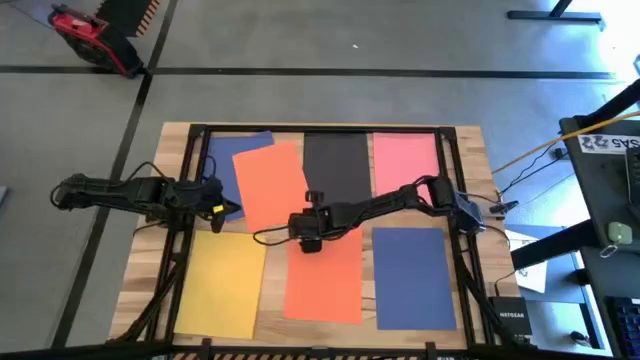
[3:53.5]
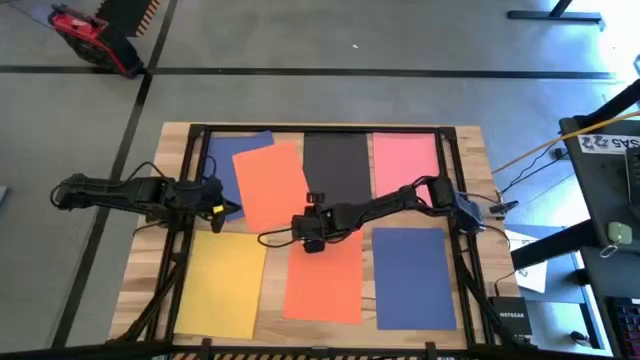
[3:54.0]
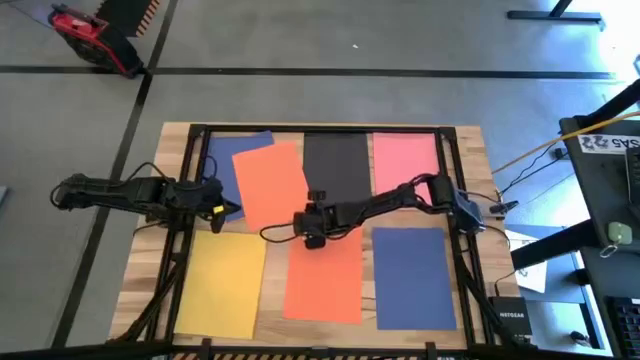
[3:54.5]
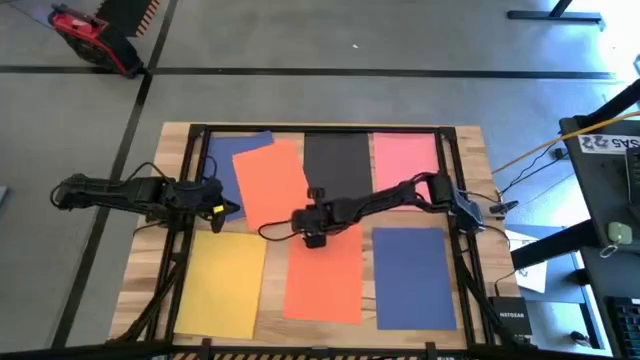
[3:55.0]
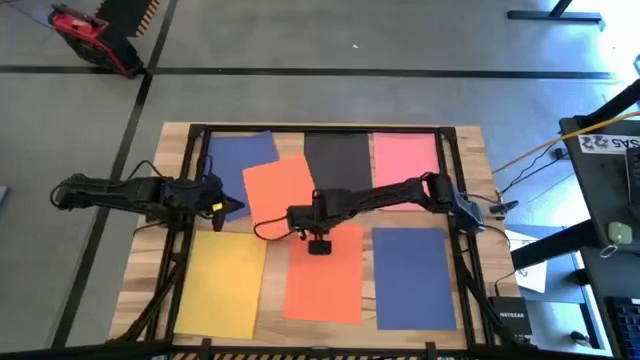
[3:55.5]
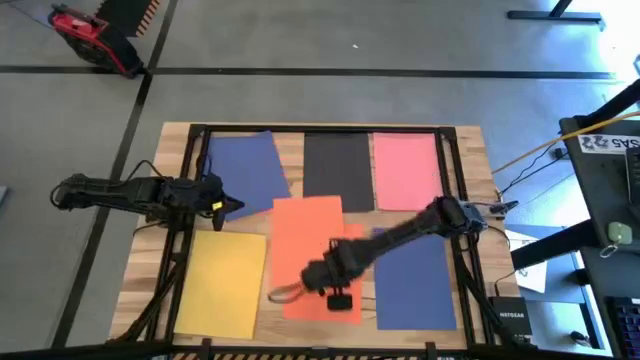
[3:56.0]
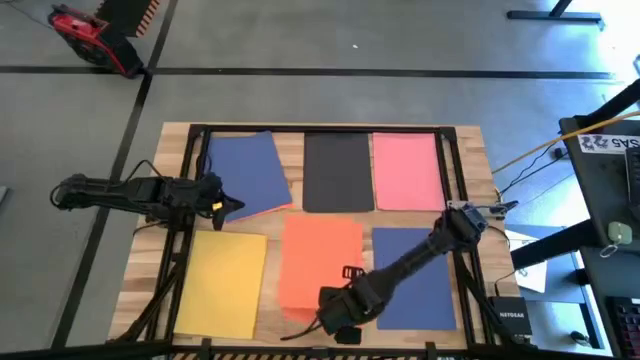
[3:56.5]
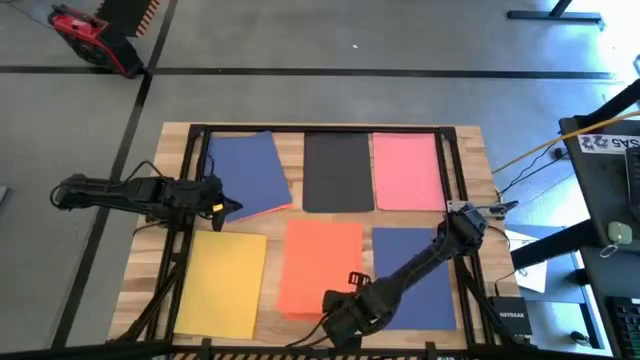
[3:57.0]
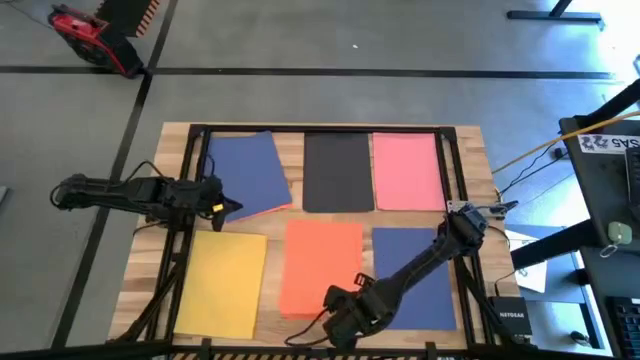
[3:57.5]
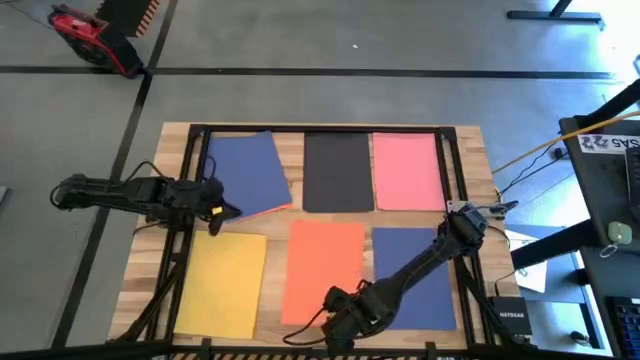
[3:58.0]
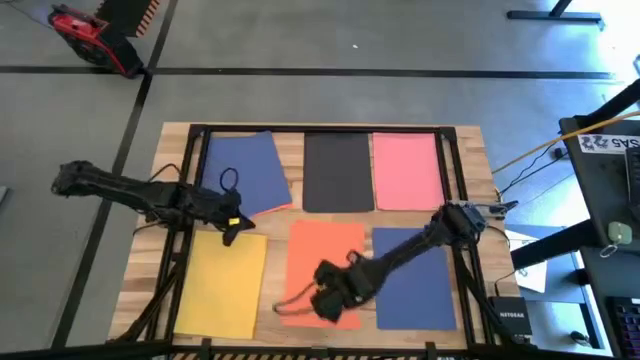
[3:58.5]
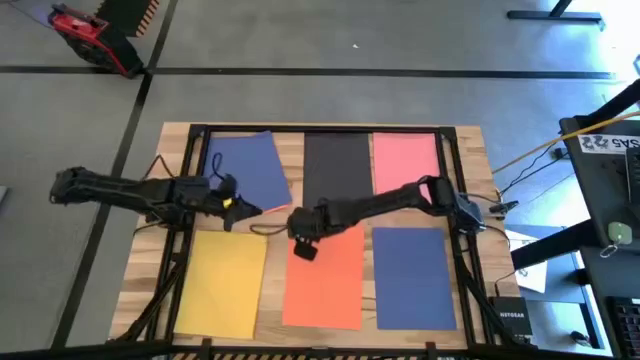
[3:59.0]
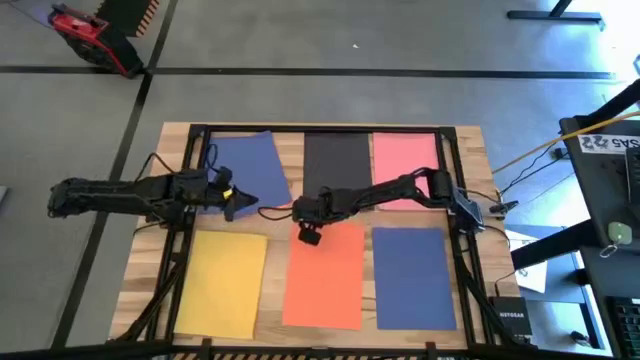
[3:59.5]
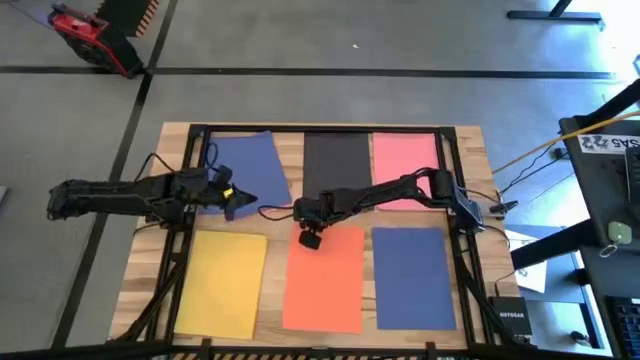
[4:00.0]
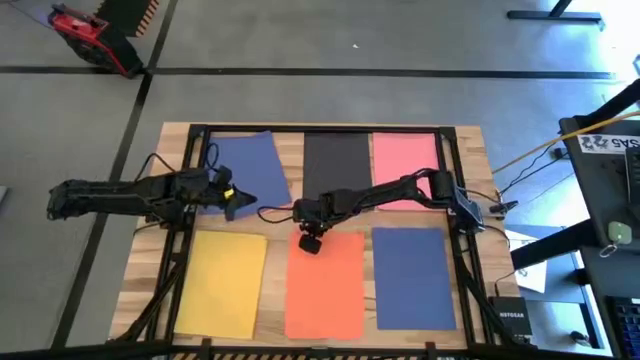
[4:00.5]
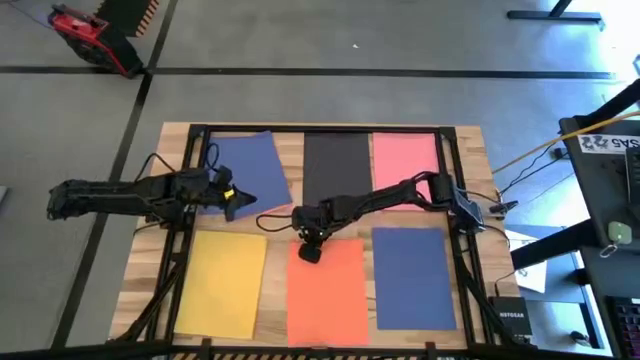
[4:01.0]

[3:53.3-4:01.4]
Task: Organize paper
Stack the orange paper on top of the other orange paper

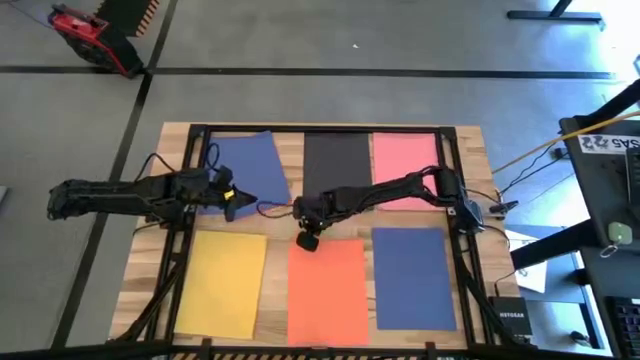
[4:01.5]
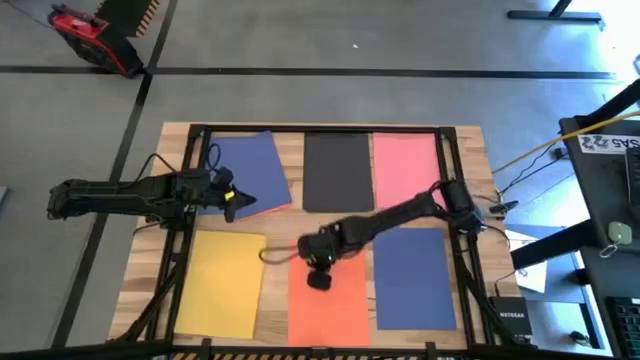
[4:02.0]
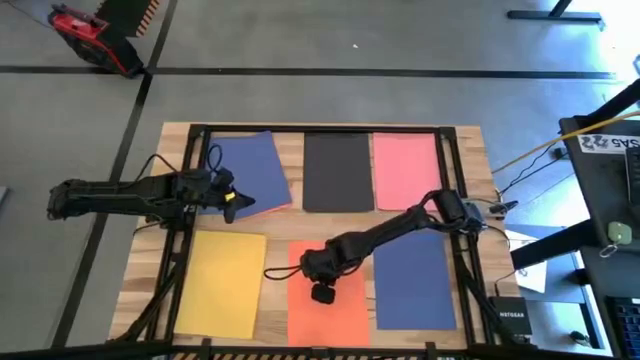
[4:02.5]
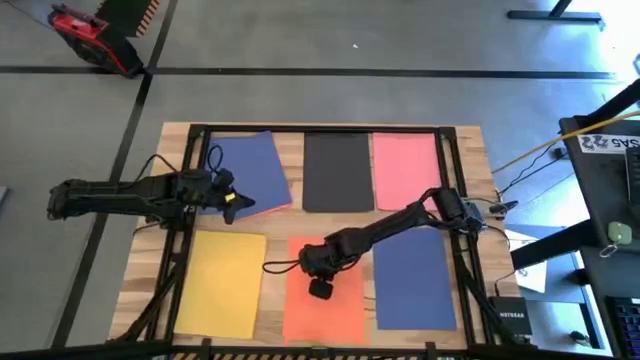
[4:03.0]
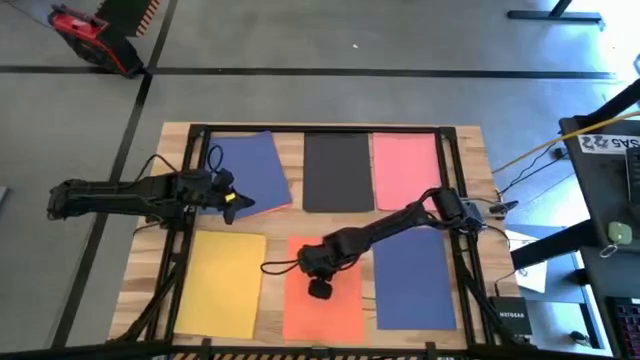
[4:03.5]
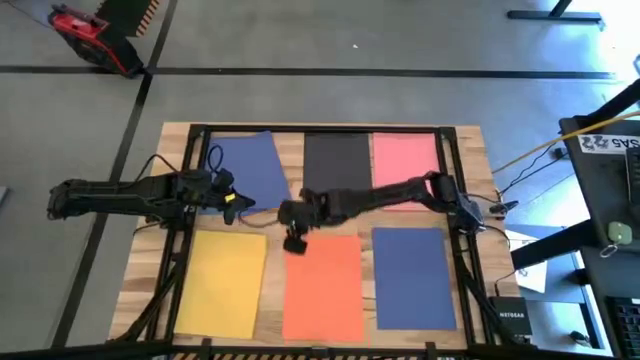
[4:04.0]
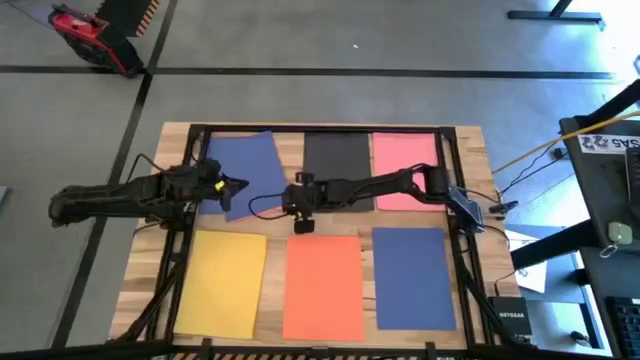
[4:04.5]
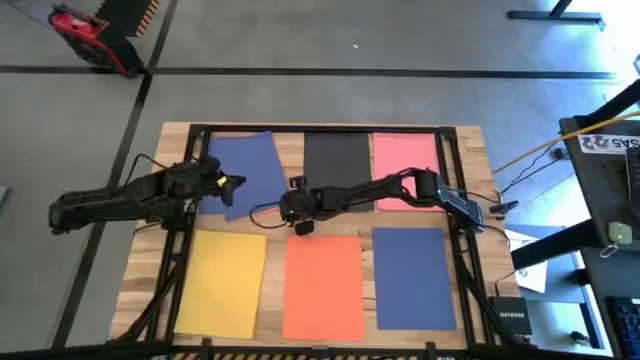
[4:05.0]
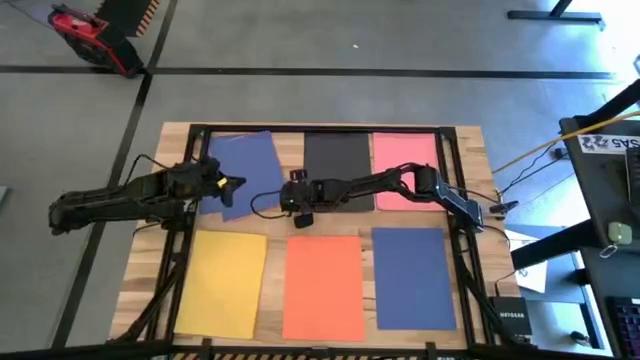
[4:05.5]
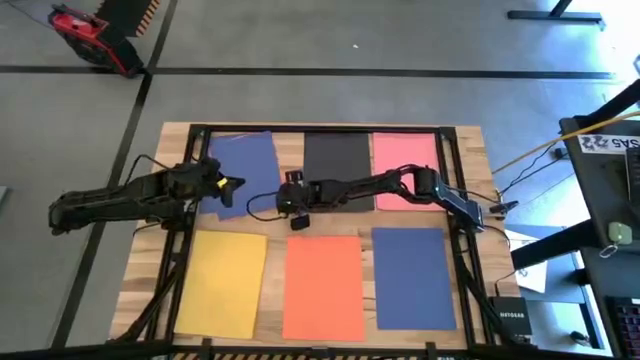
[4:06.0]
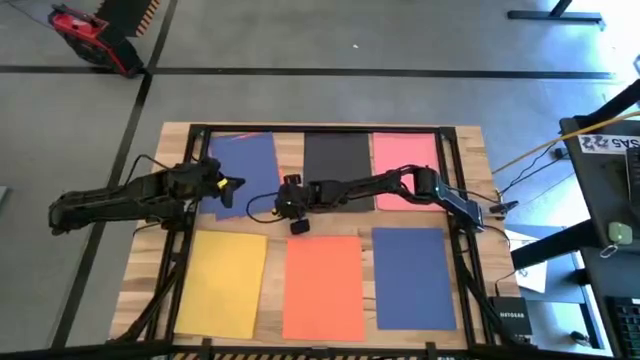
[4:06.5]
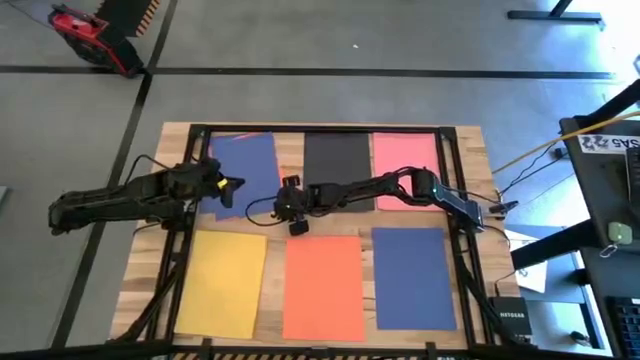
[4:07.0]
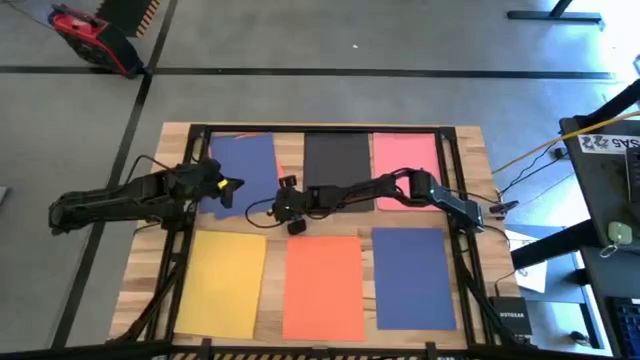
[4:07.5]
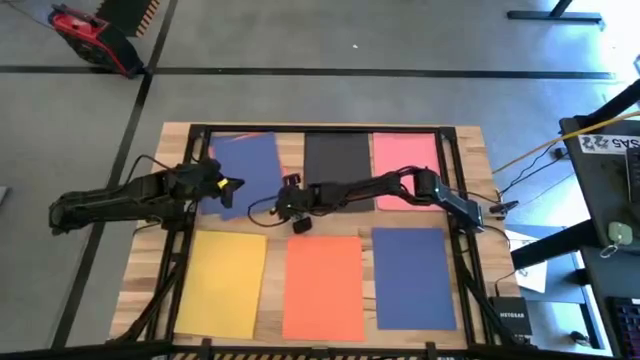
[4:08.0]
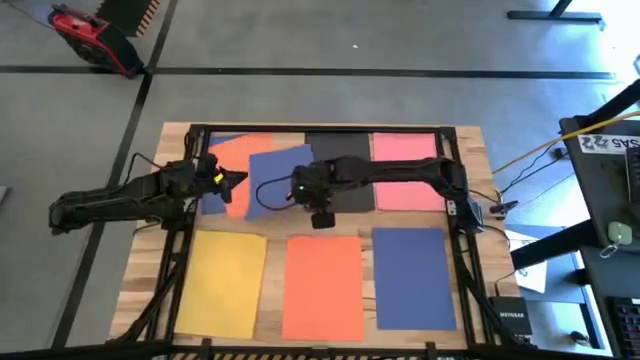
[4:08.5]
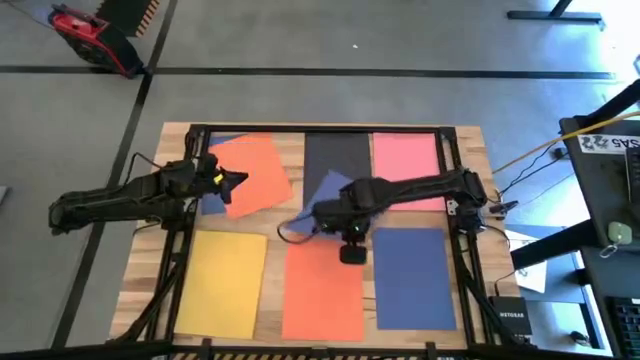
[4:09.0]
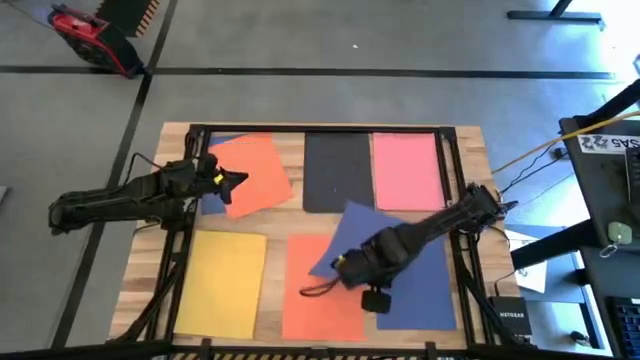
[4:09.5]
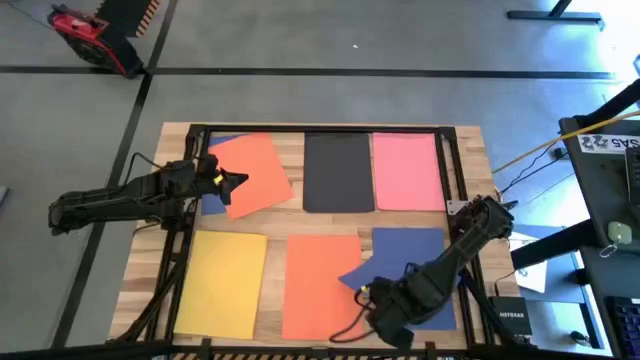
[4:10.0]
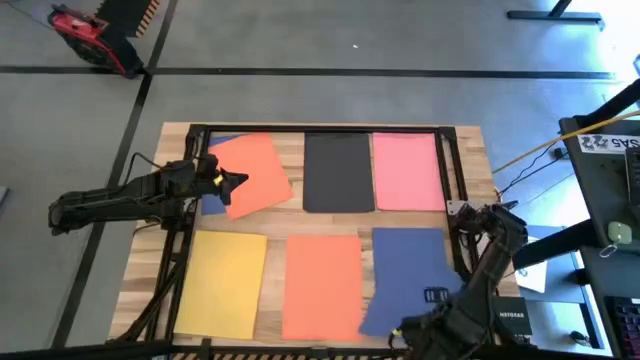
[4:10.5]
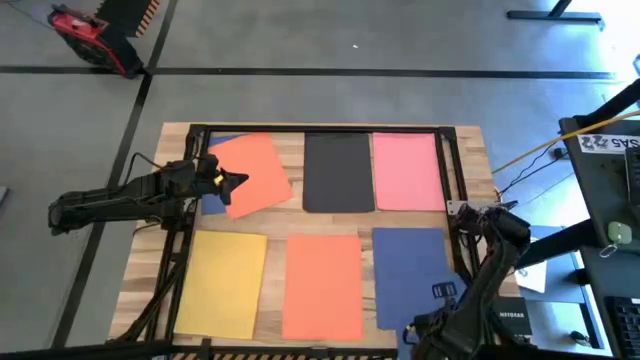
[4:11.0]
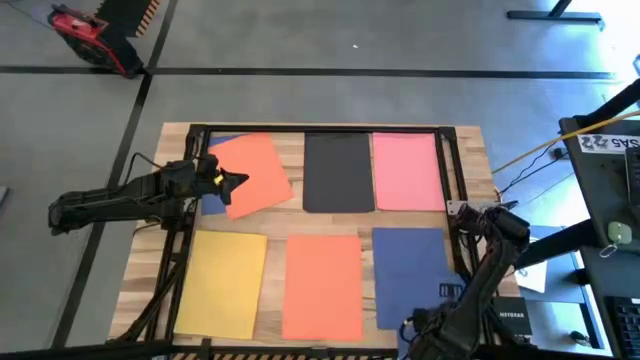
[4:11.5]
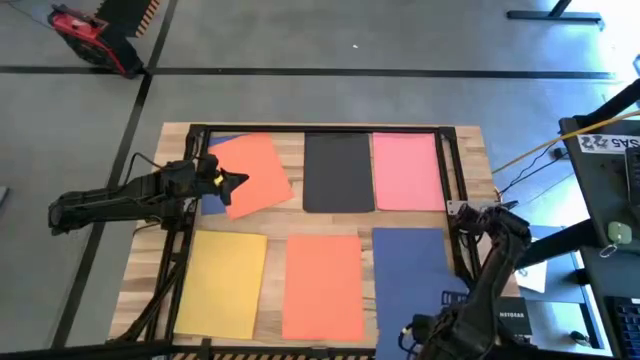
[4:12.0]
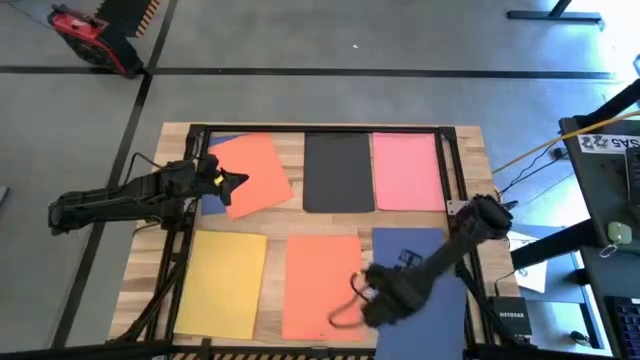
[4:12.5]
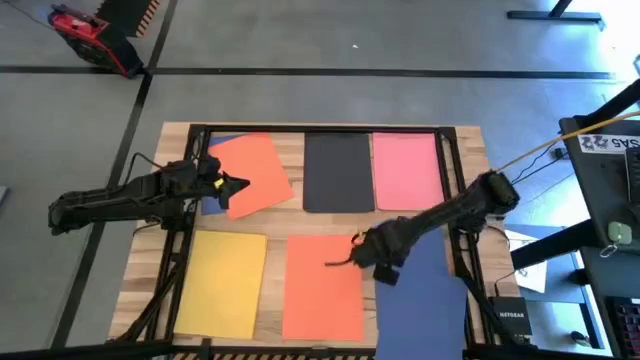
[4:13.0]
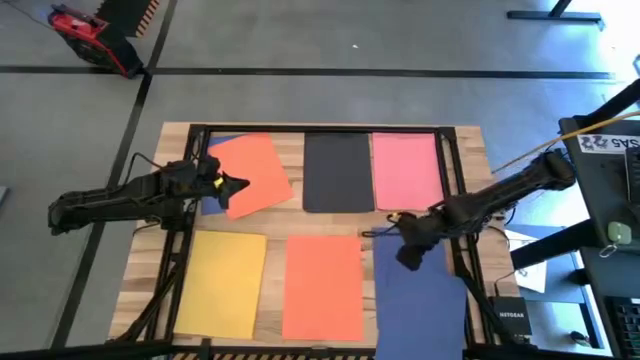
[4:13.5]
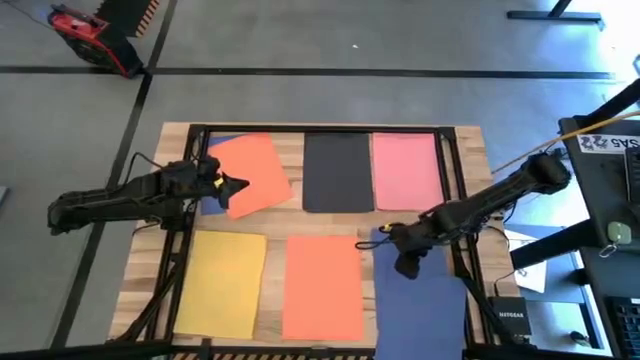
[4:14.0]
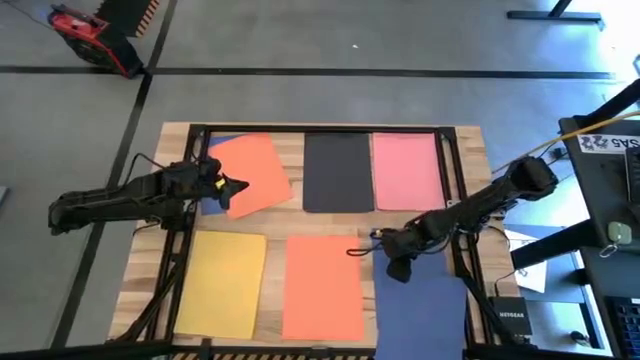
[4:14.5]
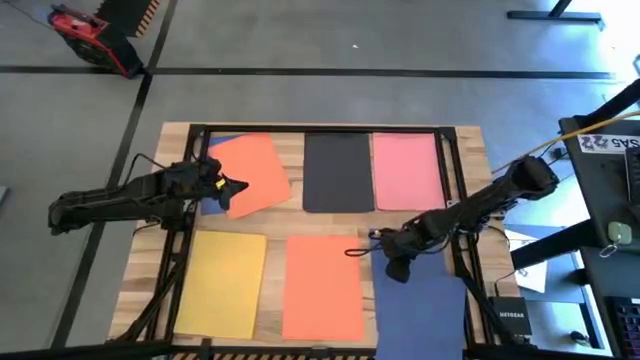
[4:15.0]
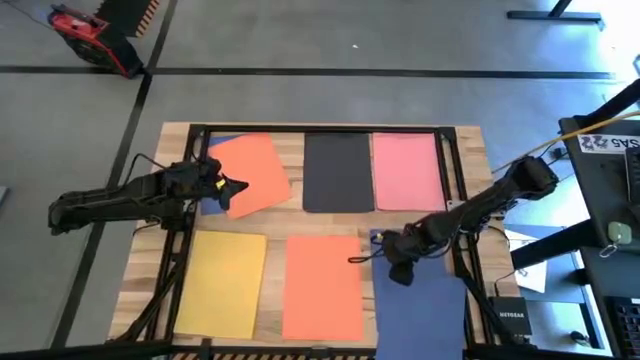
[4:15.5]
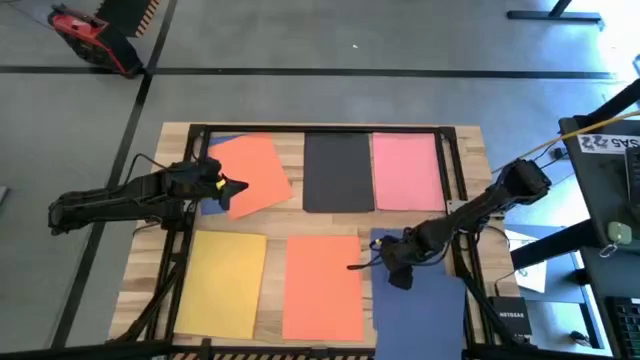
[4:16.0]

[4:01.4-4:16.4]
Stack the blue paper on top of the other blue paper
